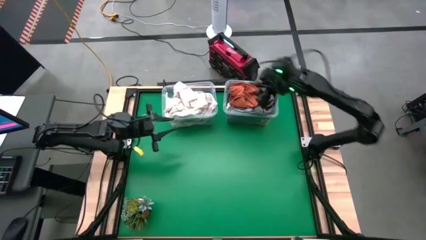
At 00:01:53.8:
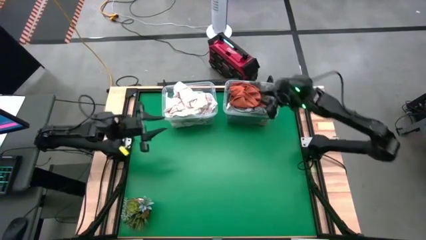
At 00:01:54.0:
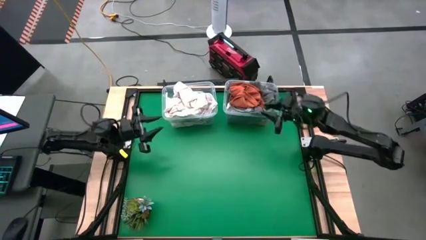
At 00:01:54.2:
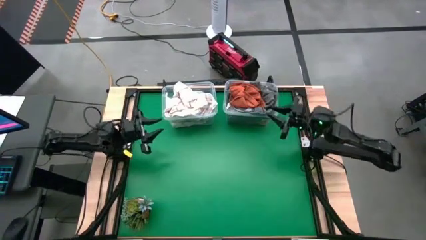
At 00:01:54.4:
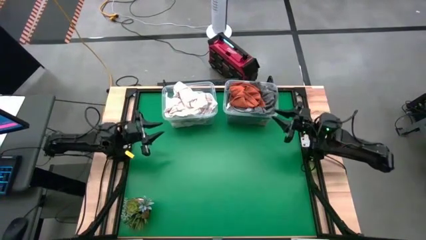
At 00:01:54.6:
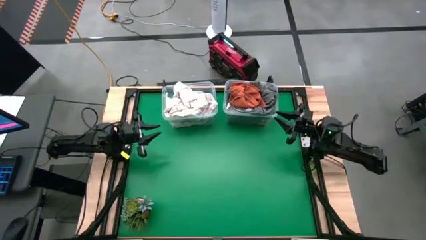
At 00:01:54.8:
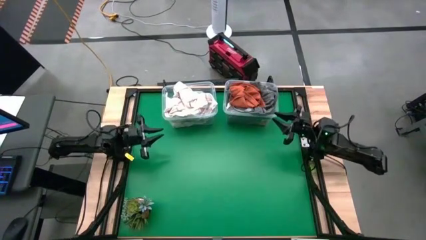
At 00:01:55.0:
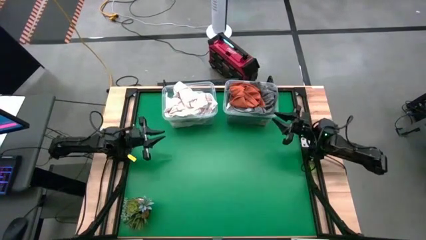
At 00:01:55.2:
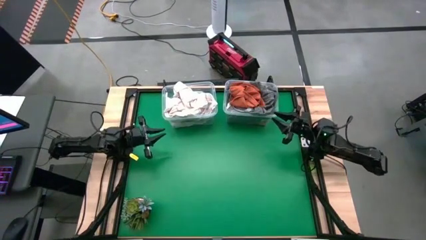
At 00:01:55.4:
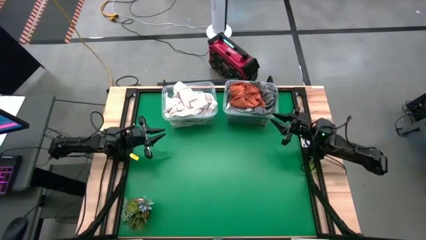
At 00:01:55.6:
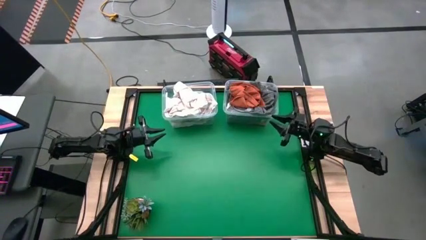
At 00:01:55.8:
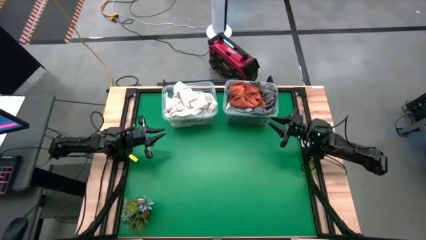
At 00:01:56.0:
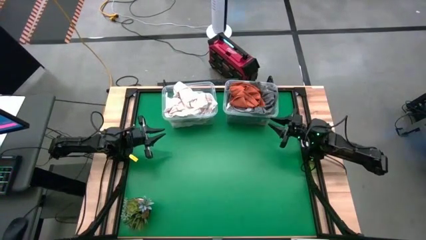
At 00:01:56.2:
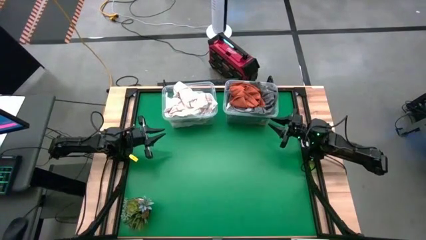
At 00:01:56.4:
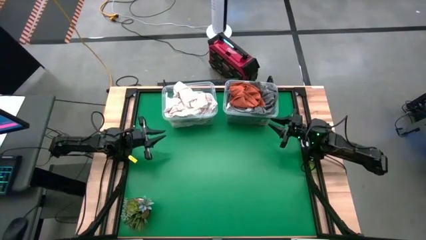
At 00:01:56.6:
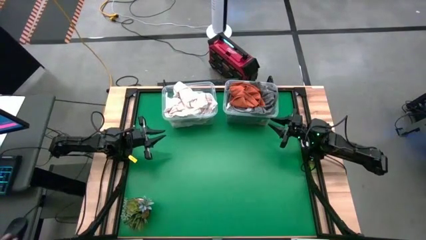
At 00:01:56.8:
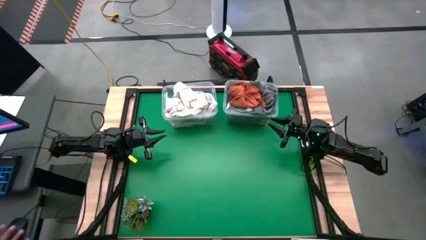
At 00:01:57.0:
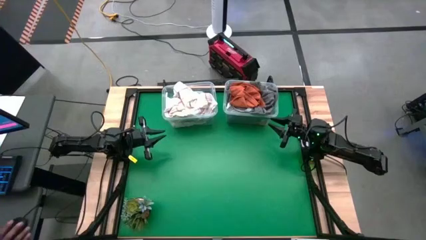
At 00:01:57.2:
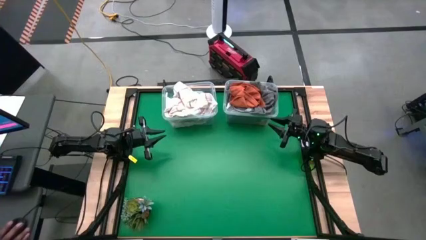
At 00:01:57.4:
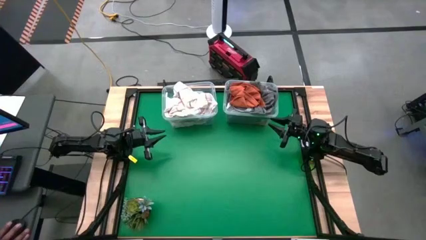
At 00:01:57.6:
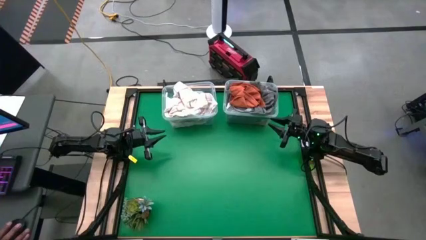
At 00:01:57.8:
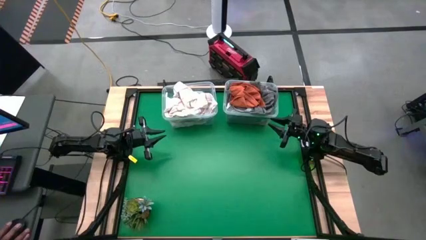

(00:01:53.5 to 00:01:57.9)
Task: Sort towels by color in basket
Return to Home Position

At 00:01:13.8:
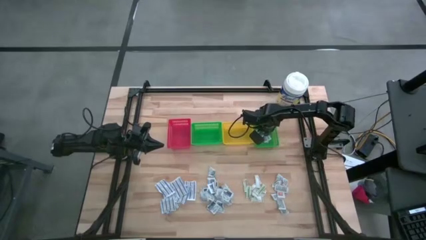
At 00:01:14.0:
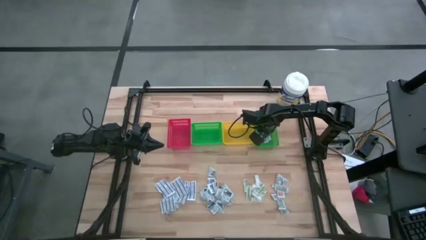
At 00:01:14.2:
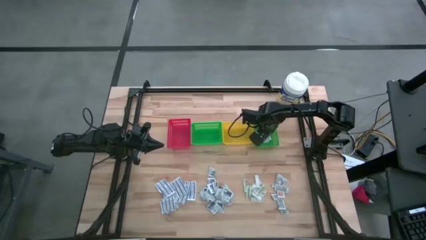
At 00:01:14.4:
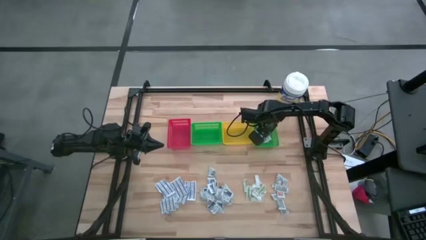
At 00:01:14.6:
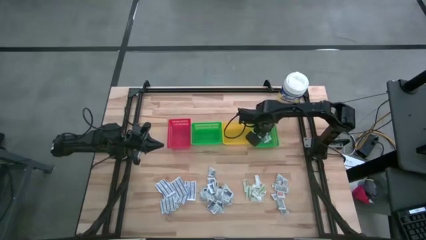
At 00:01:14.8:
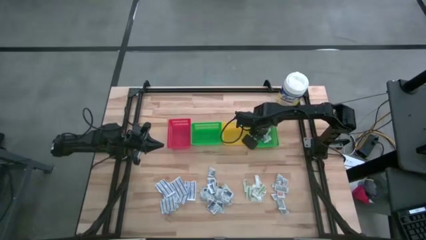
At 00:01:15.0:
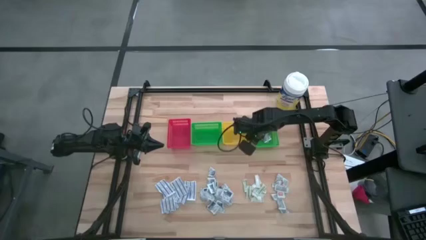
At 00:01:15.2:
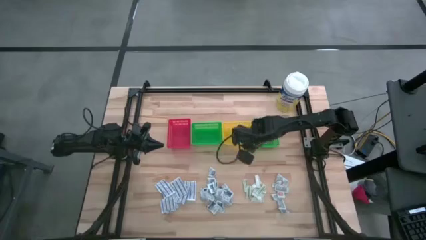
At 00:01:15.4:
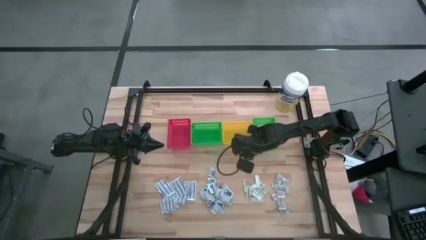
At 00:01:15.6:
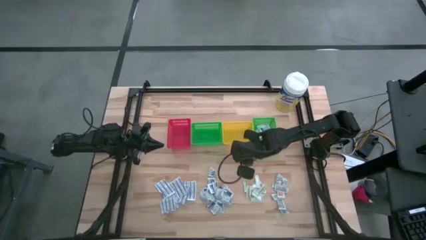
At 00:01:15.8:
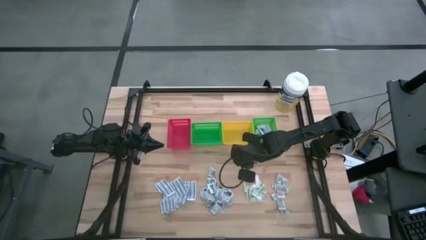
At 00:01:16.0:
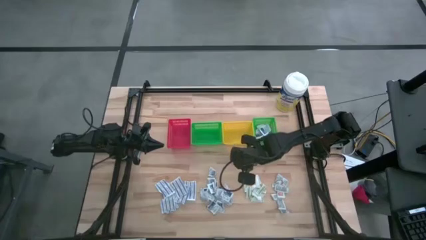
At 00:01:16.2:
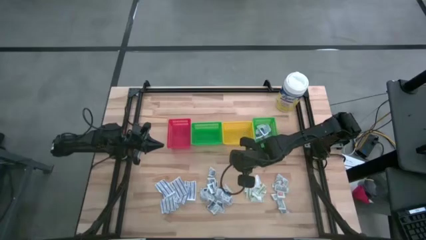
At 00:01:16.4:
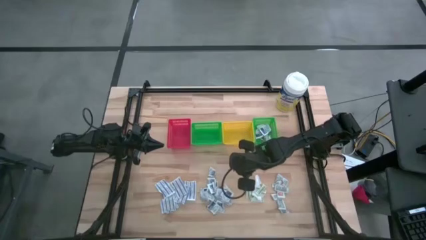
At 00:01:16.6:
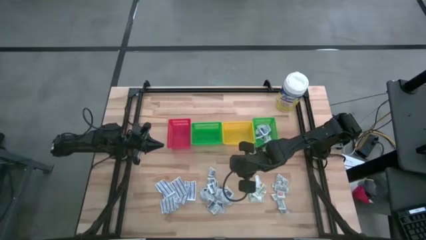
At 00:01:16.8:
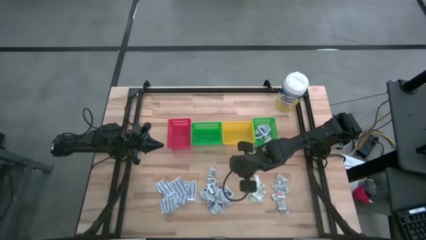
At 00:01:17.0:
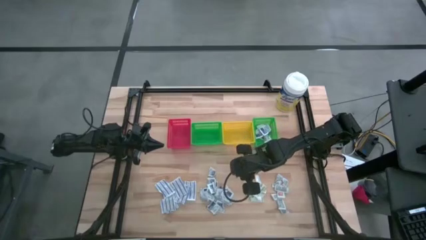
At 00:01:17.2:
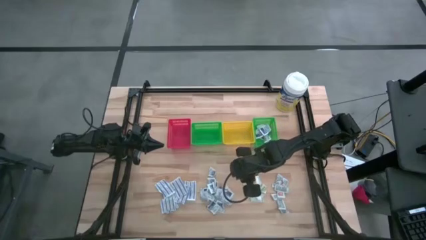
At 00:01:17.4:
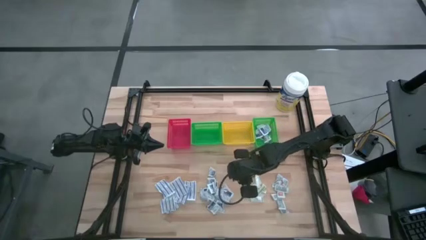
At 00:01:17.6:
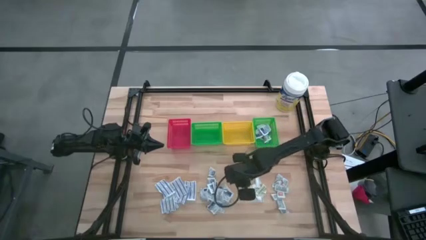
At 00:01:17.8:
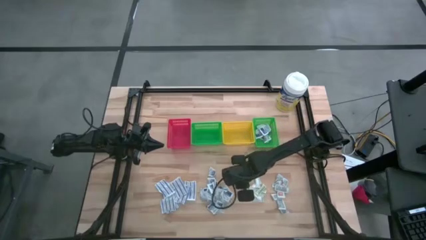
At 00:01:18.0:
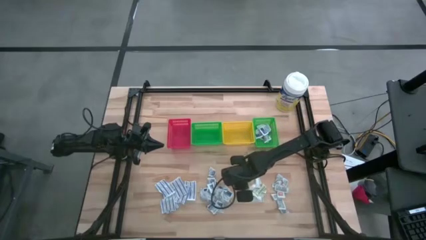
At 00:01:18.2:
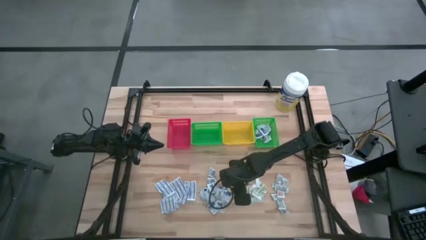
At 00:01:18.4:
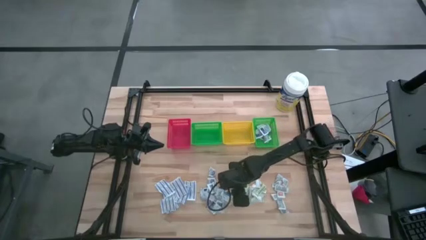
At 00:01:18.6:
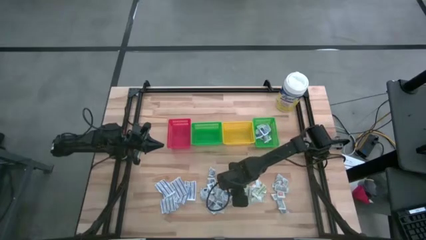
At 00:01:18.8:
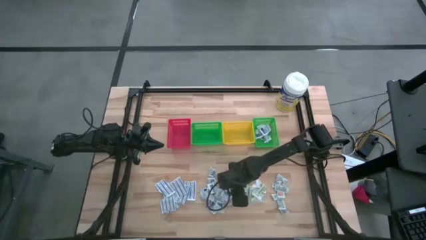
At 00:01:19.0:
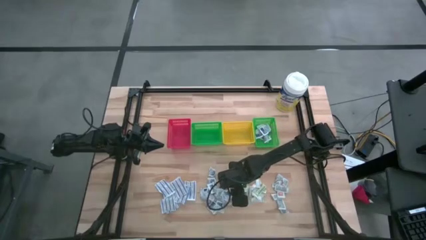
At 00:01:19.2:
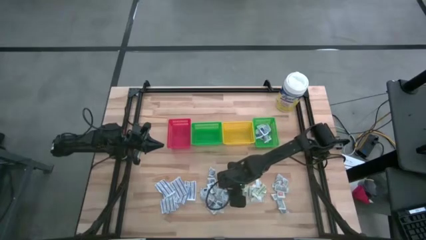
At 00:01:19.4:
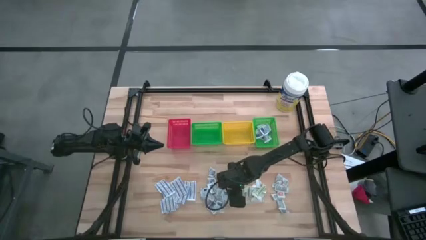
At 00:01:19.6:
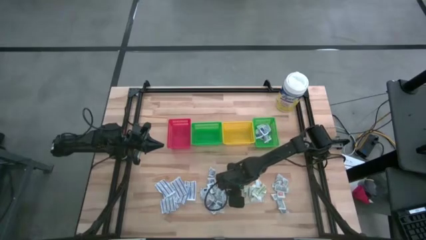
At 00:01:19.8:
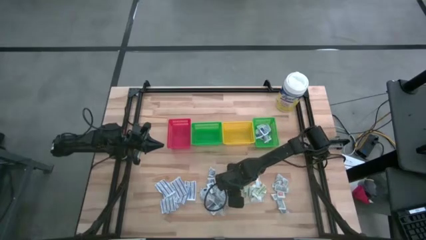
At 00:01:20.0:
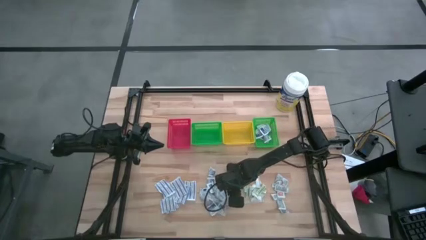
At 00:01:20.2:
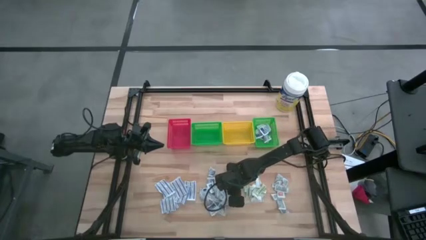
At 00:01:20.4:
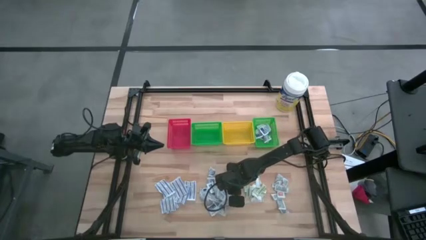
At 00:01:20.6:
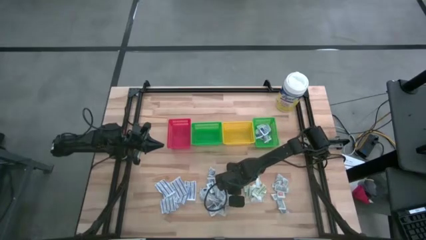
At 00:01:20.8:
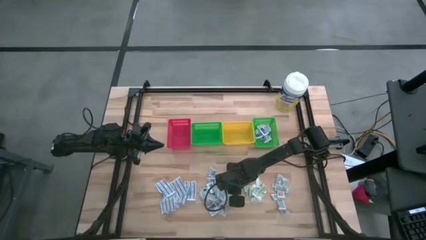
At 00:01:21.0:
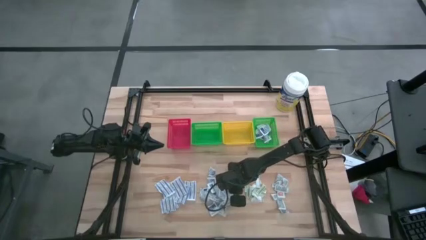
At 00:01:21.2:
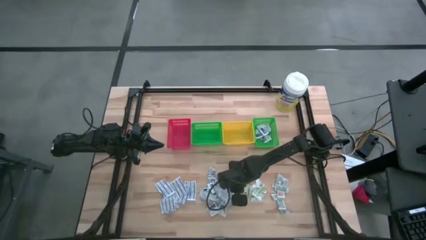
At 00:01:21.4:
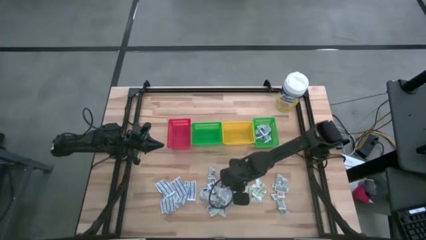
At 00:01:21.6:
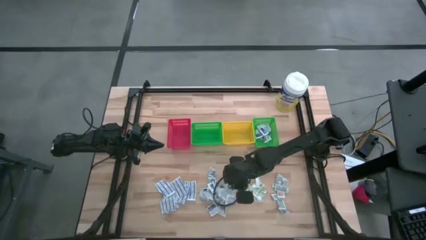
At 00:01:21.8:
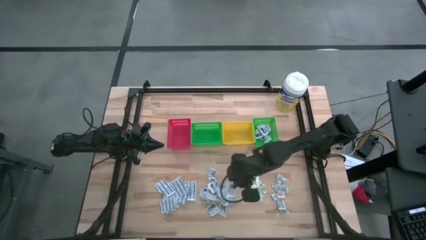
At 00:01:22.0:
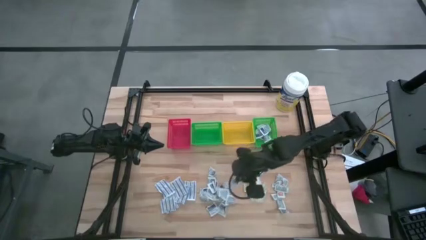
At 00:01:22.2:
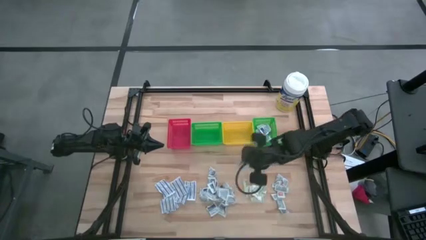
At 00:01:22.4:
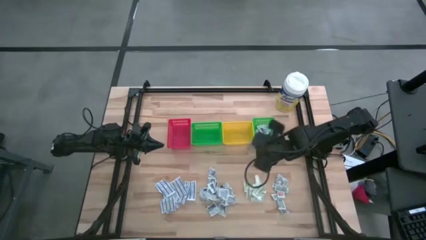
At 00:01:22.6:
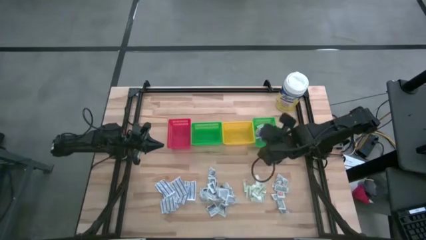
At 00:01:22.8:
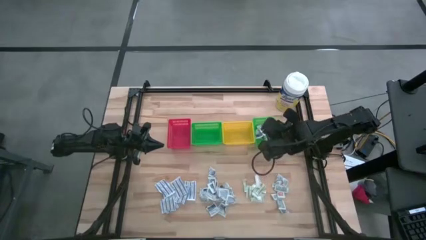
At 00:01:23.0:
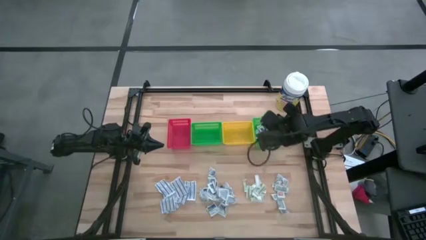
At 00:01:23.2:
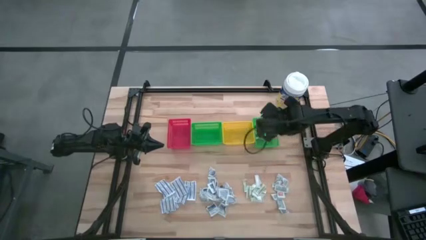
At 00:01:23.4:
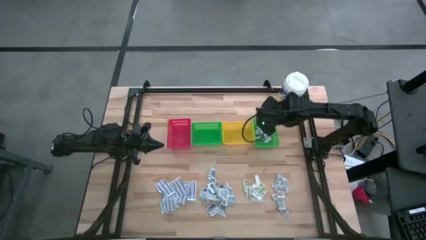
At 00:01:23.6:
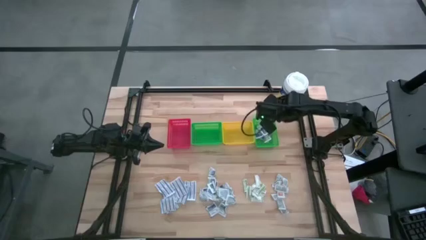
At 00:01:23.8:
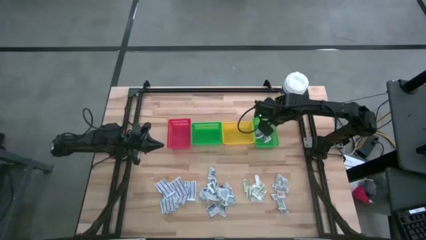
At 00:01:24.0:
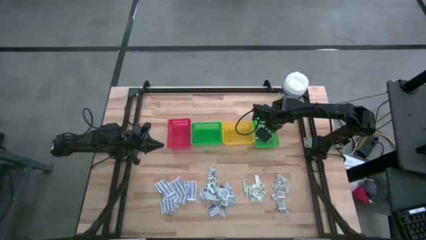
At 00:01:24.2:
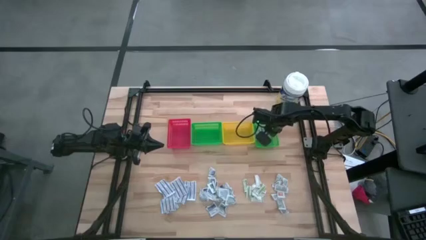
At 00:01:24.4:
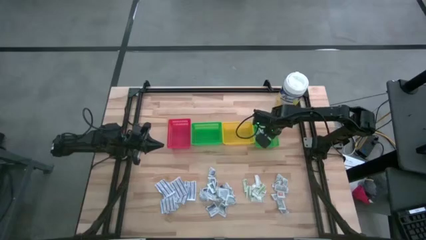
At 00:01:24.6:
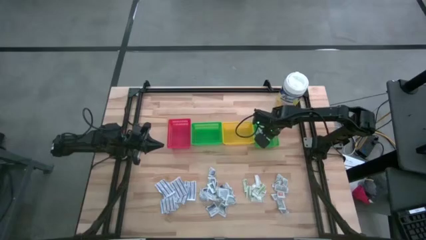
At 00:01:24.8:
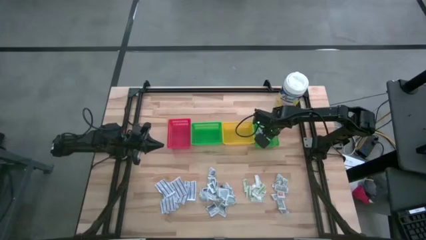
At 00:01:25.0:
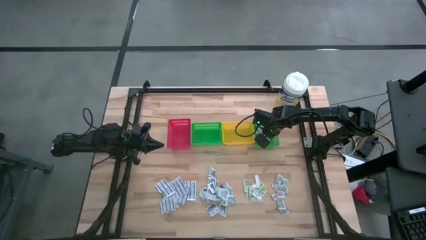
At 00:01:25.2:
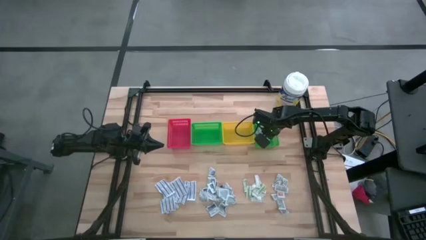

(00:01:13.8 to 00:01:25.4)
Task: Pick & Place First Aid Supplies
Put the blue alcohol pad into the right green bin
